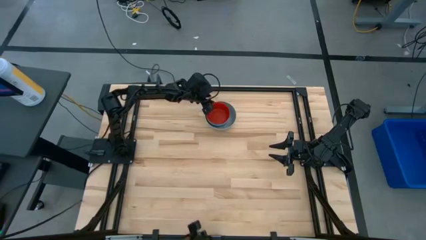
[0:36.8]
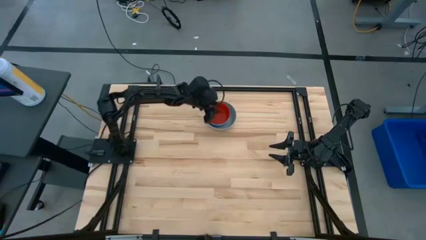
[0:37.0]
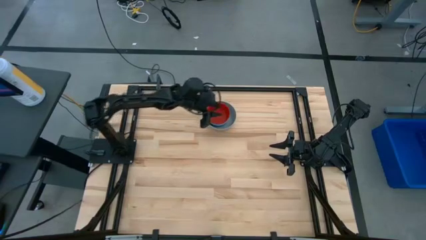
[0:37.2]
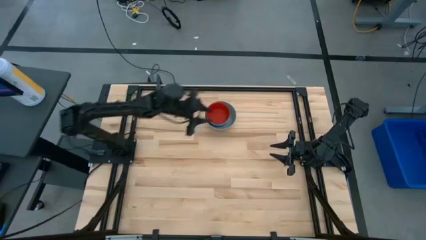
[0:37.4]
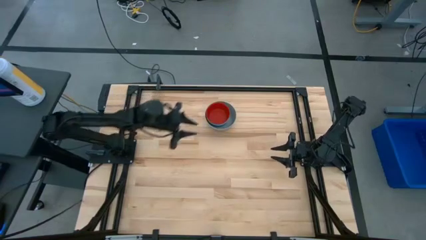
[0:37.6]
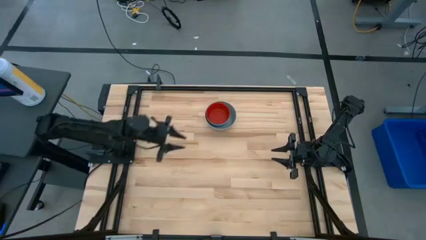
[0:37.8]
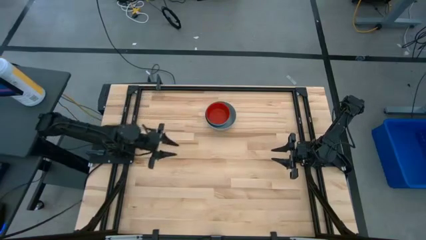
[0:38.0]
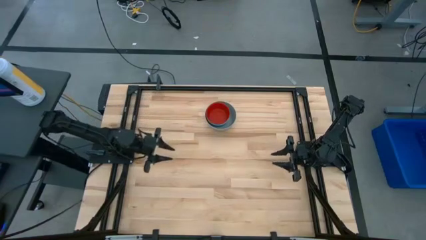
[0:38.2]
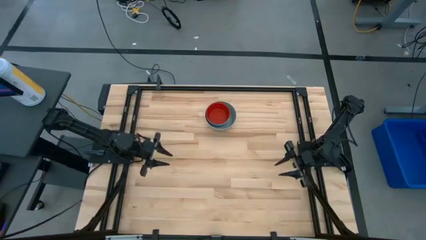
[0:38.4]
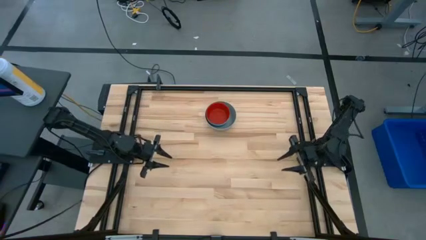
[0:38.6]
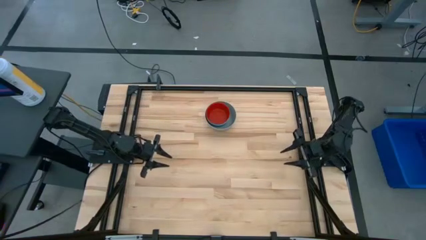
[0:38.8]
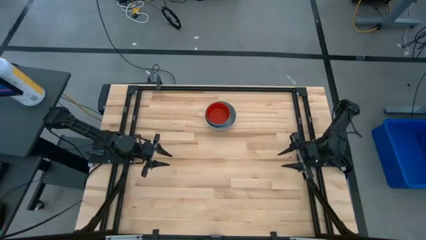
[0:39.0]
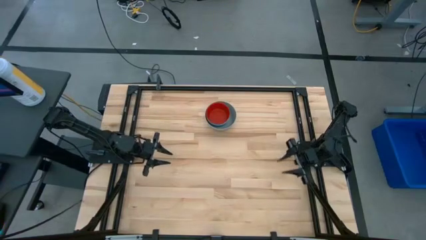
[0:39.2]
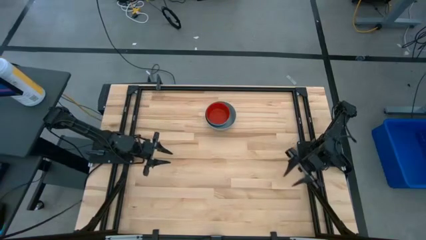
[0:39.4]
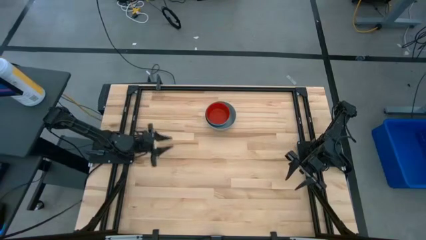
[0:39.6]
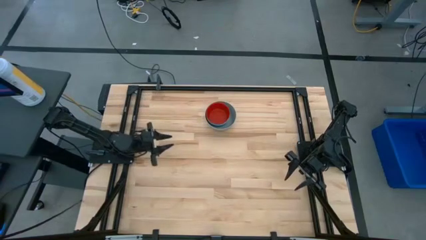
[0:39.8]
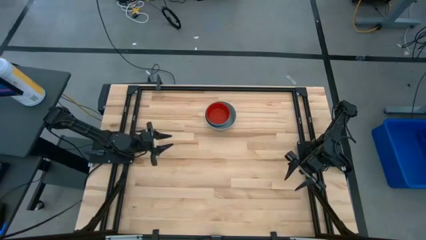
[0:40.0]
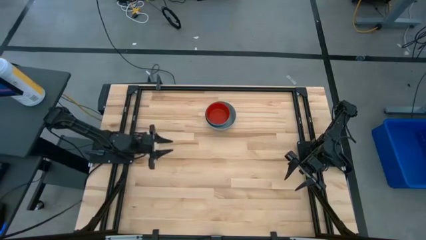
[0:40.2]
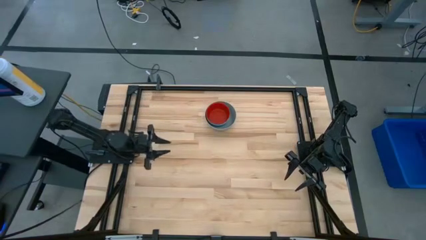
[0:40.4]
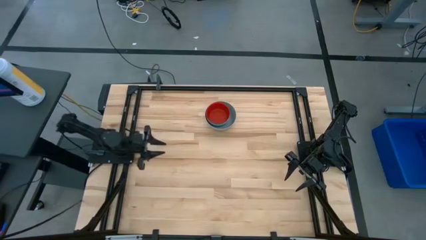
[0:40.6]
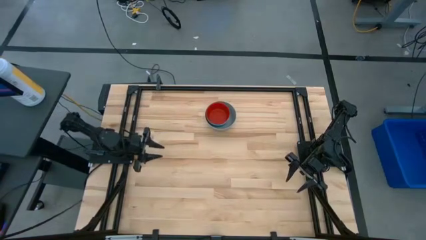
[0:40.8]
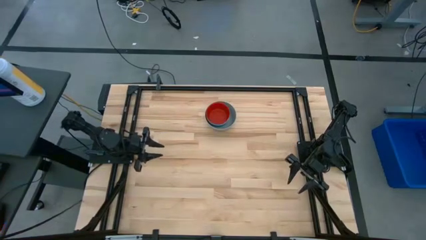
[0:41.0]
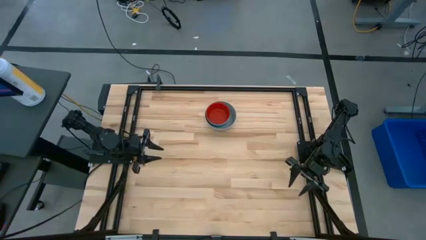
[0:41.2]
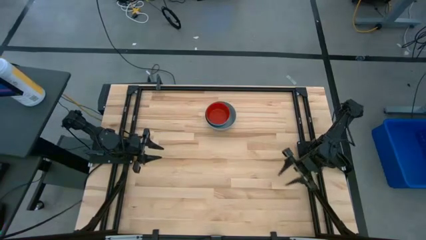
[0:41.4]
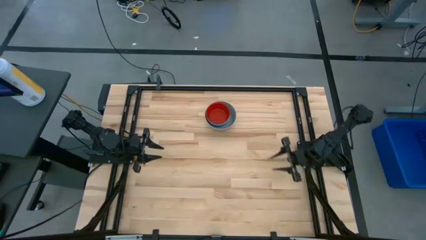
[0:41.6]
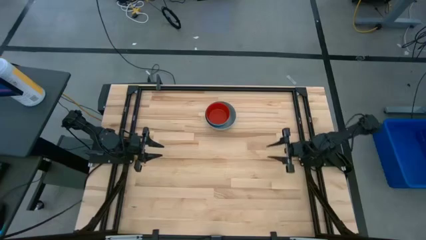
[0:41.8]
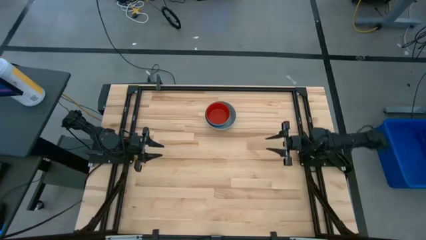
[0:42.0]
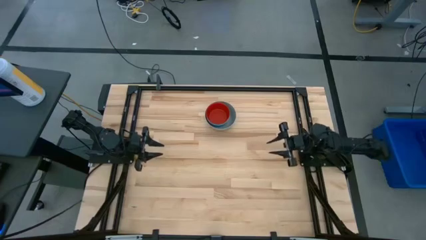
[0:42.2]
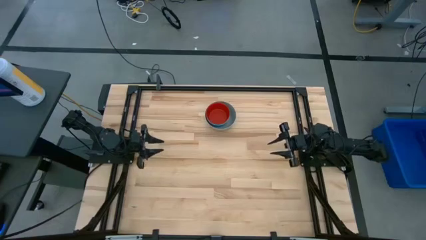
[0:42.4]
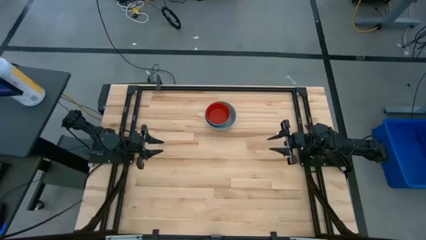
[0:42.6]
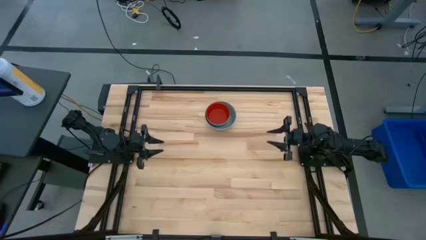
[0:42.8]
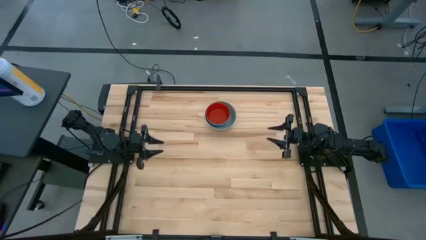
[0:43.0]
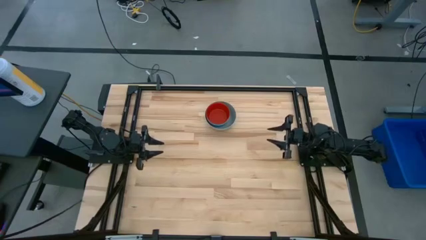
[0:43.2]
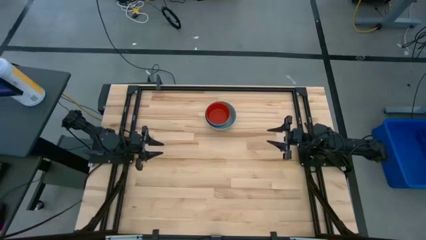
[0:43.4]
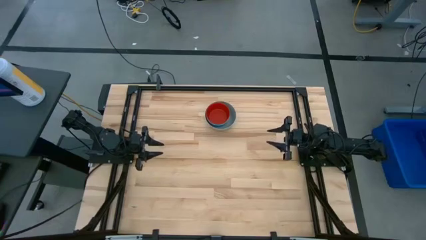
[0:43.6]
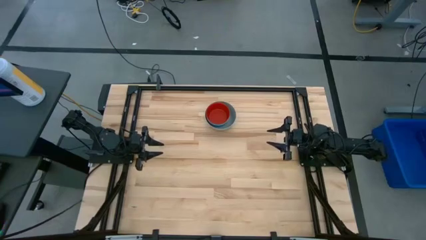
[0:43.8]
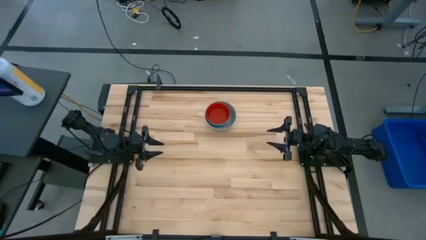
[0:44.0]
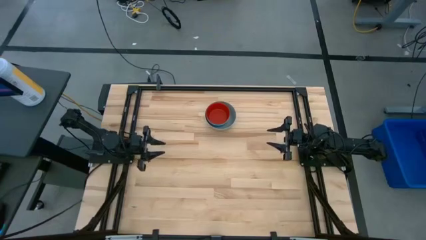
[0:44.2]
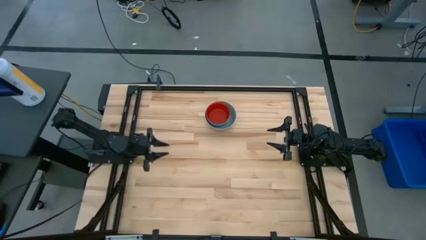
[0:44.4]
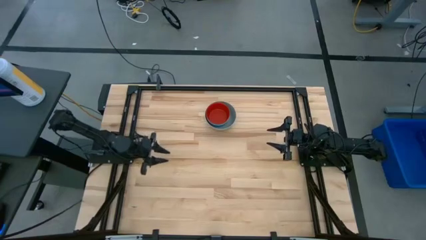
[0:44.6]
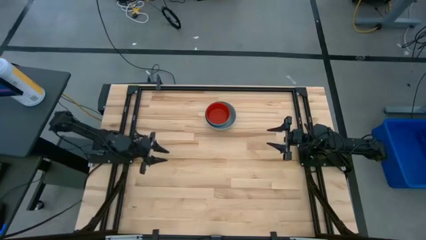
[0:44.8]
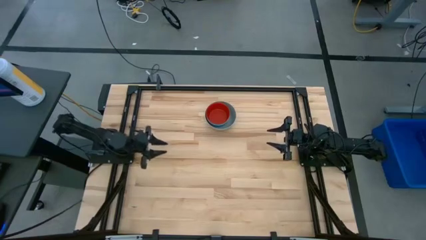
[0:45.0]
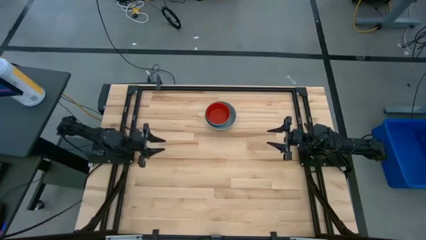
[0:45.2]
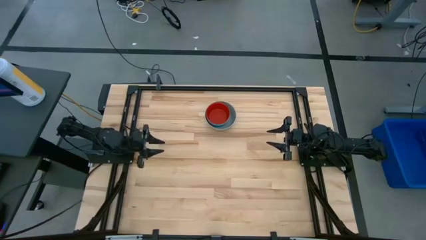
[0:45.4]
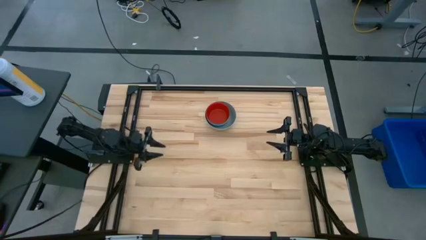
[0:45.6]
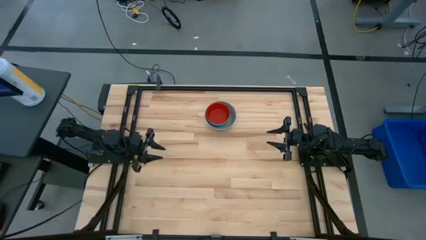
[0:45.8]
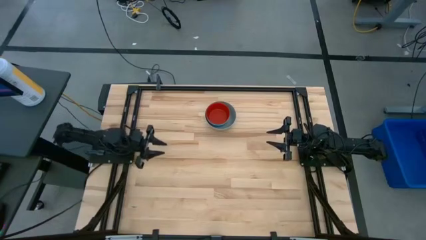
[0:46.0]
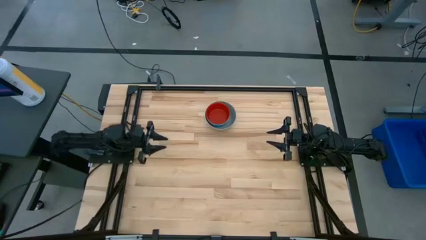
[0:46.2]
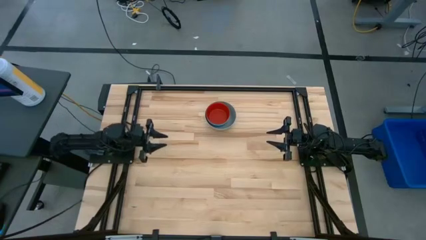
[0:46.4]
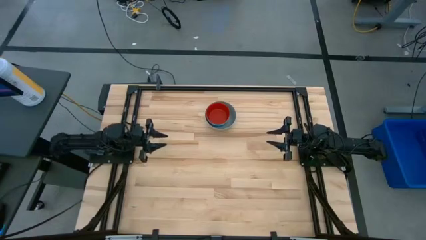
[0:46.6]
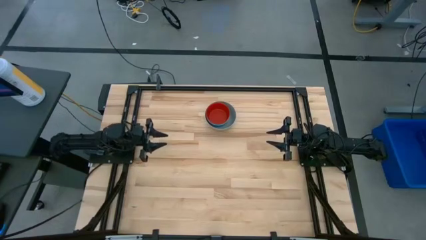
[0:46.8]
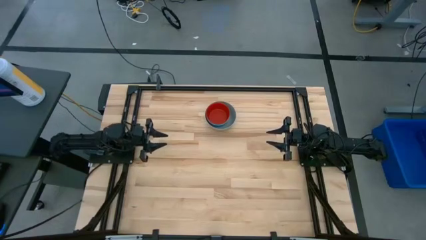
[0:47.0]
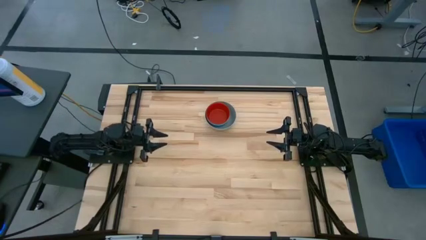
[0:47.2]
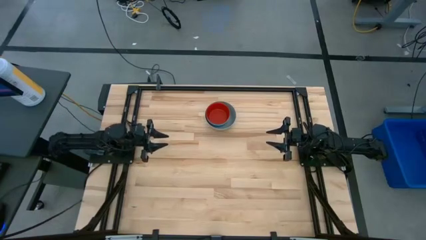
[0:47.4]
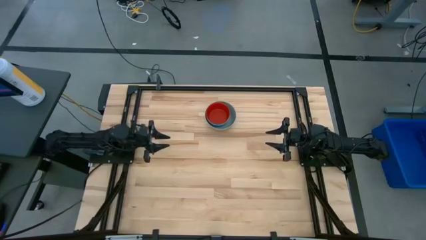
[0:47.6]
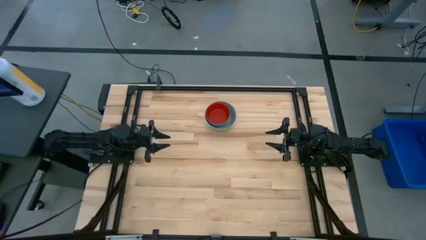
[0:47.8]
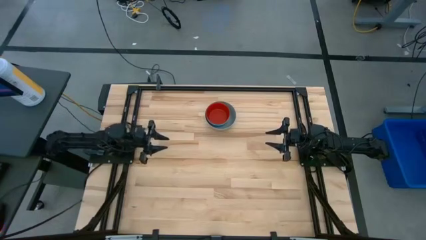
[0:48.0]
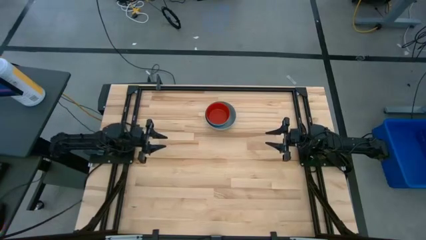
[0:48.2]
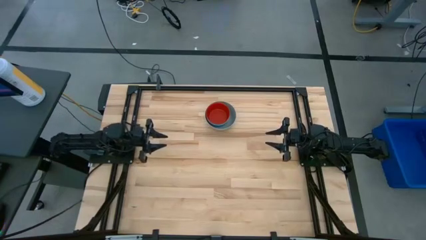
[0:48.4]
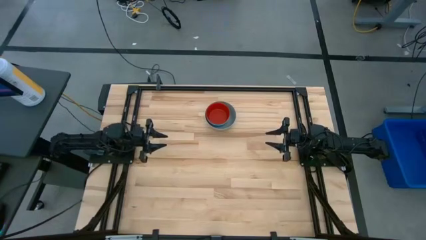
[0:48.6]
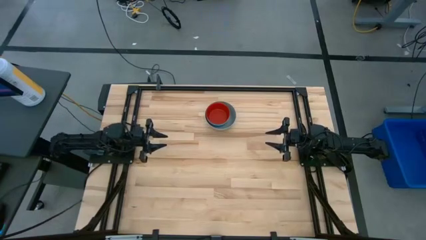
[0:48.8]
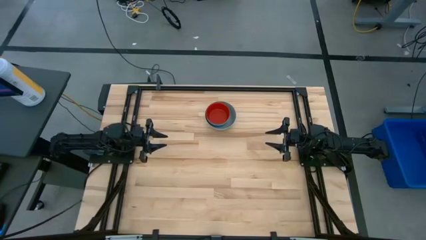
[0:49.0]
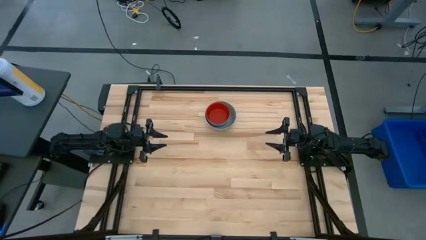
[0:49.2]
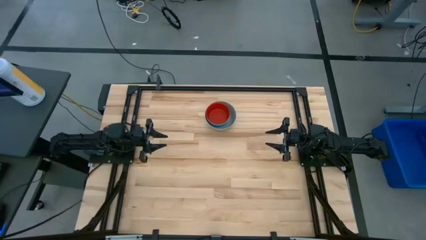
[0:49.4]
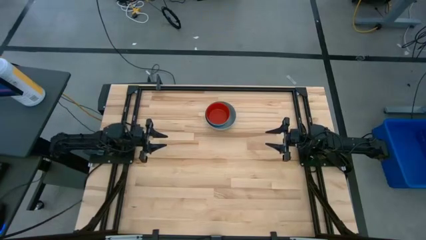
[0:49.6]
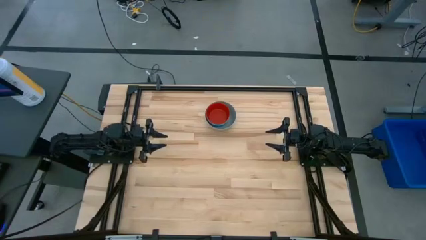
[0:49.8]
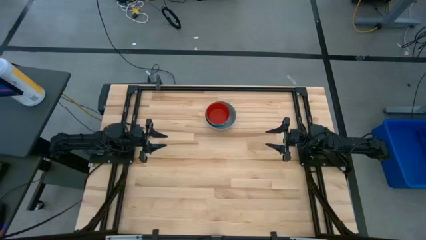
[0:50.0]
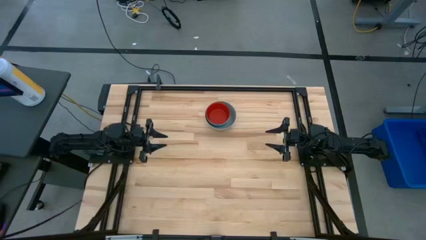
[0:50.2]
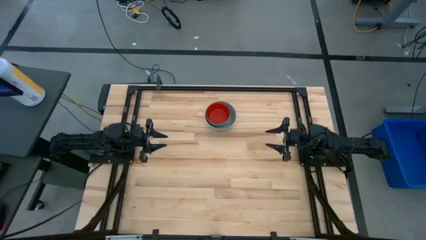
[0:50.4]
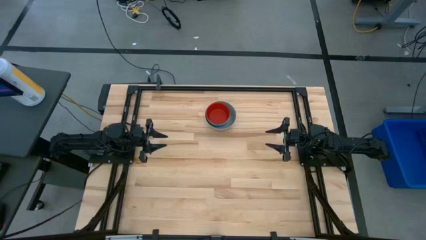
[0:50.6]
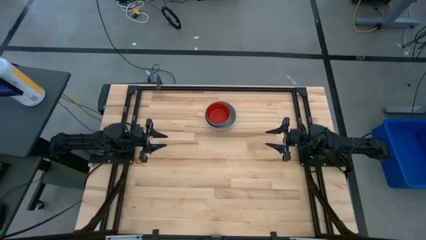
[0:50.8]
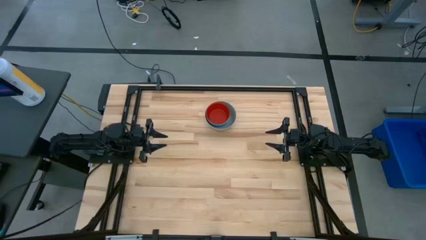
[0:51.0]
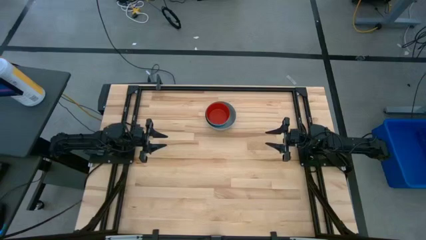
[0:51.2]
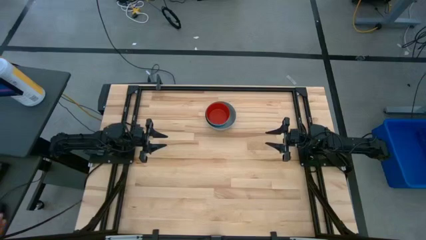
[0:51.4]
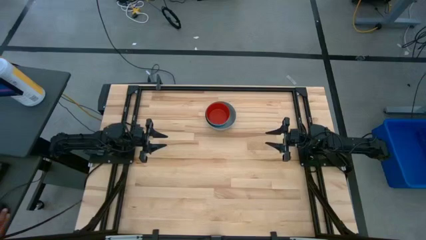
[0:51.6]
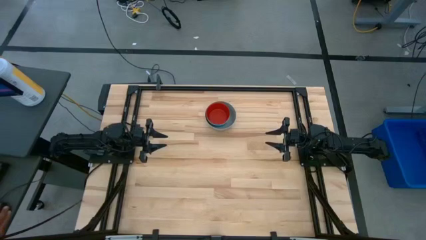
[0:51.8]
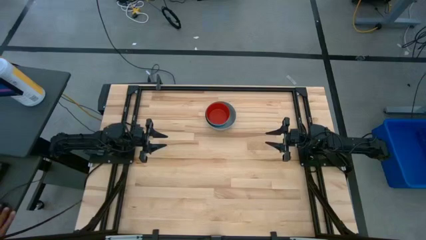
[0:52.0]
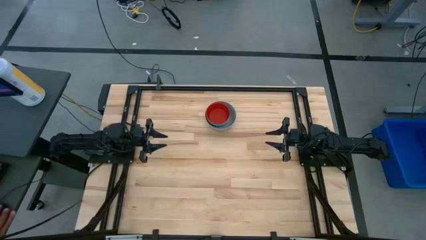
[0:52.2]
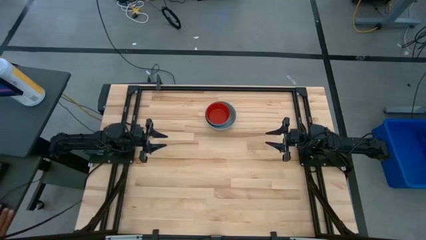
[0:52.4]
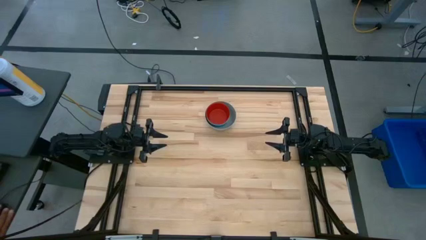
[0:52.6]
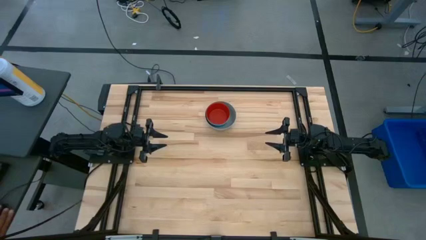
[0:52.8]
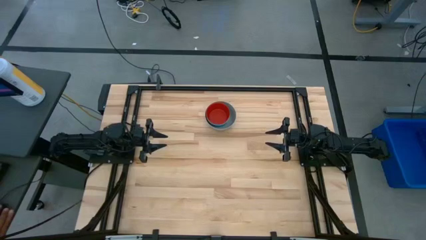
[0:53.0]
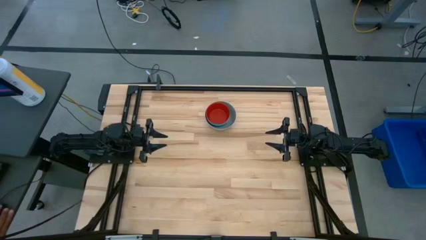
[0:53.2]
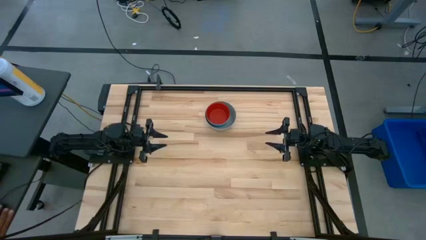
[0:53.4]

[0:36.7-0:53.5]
Return to Home Position
